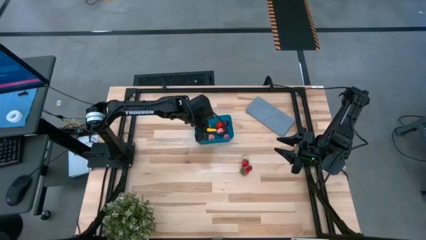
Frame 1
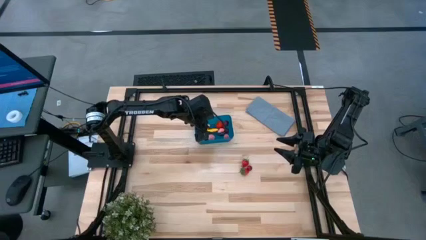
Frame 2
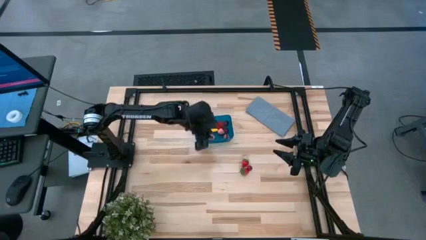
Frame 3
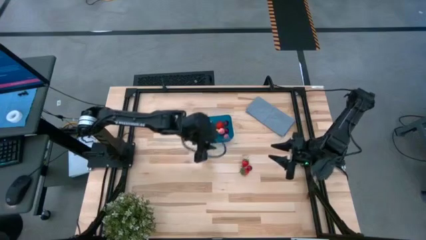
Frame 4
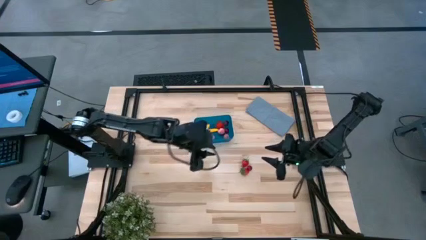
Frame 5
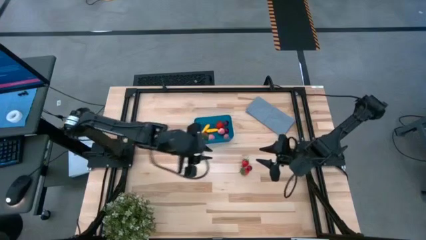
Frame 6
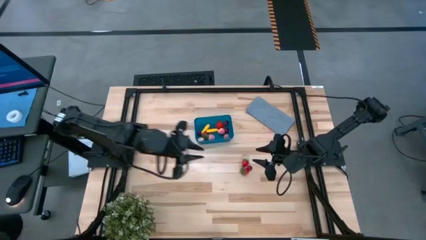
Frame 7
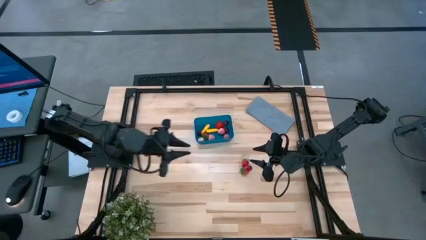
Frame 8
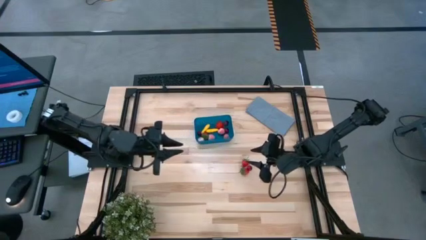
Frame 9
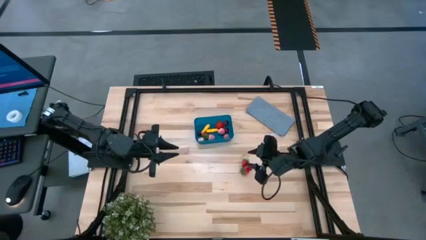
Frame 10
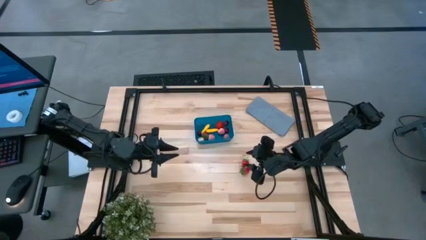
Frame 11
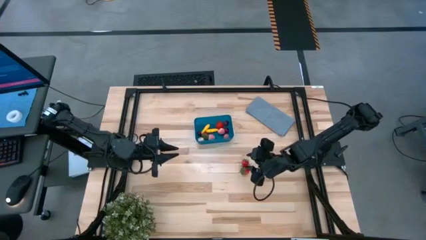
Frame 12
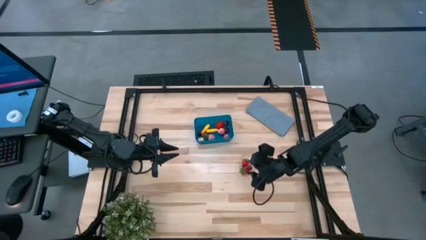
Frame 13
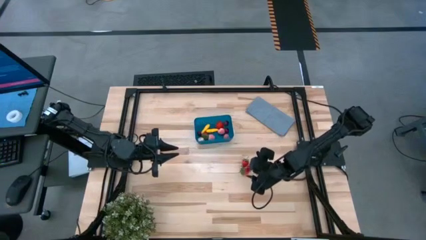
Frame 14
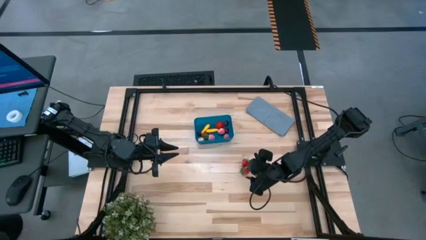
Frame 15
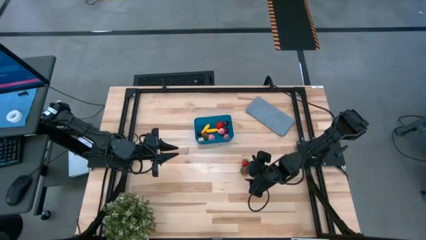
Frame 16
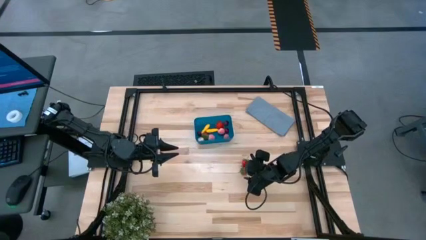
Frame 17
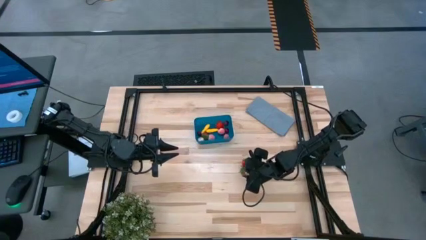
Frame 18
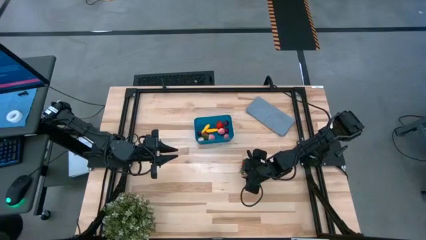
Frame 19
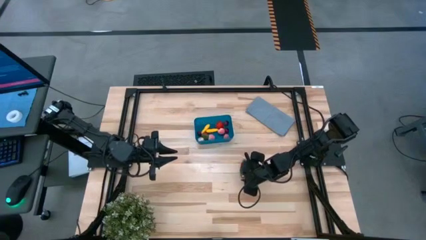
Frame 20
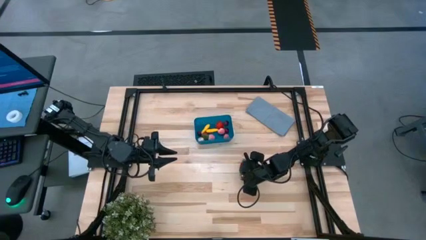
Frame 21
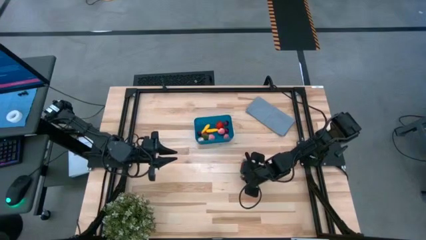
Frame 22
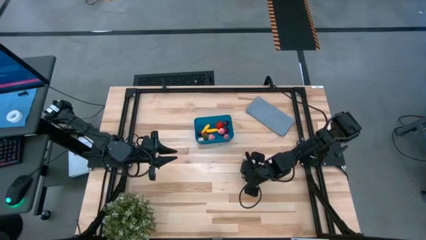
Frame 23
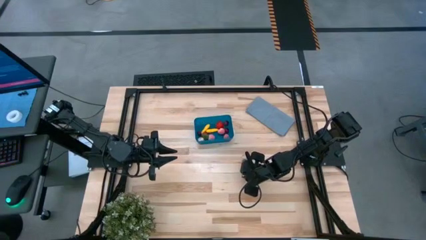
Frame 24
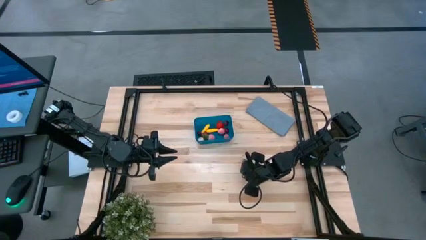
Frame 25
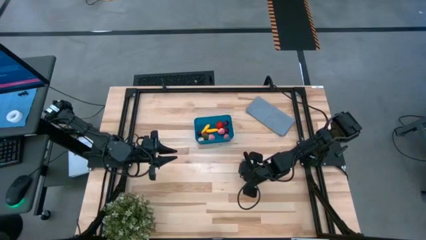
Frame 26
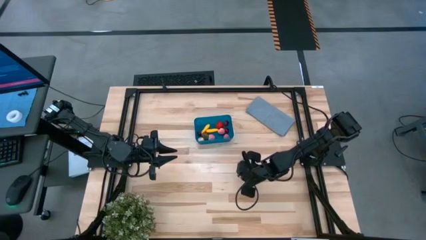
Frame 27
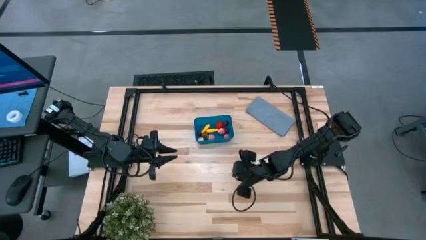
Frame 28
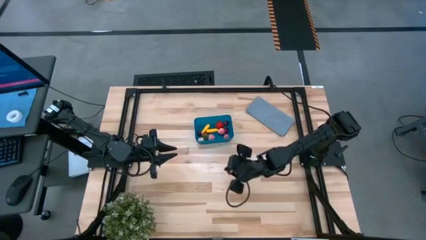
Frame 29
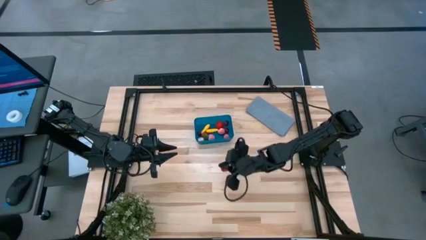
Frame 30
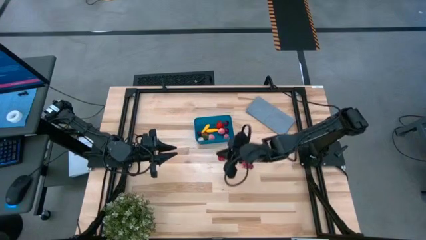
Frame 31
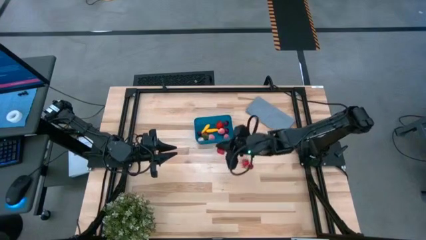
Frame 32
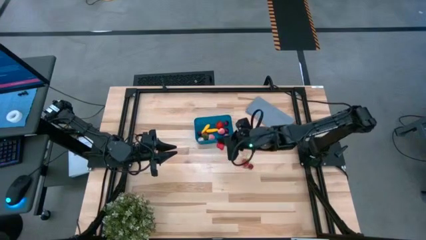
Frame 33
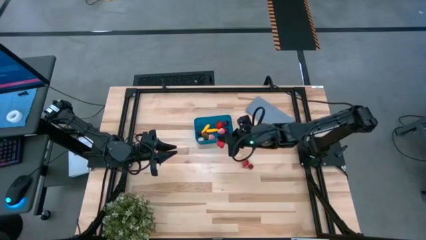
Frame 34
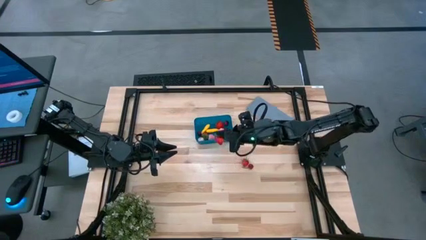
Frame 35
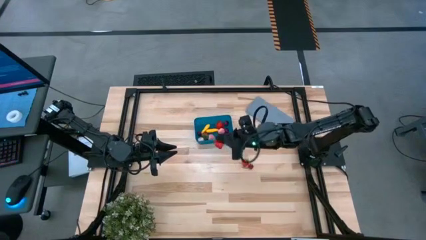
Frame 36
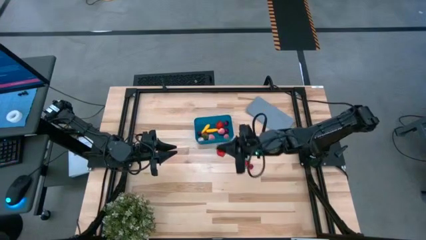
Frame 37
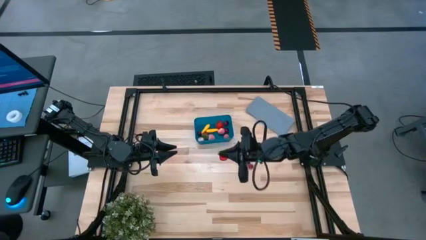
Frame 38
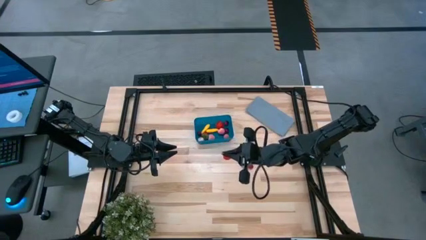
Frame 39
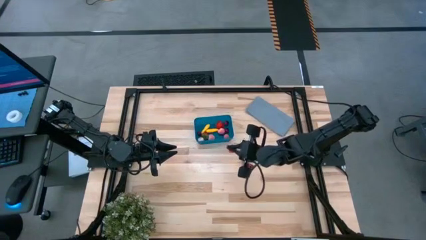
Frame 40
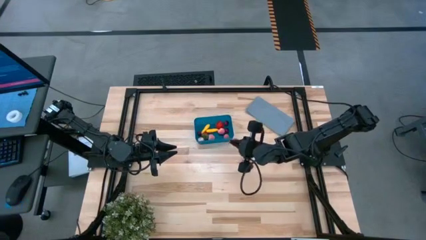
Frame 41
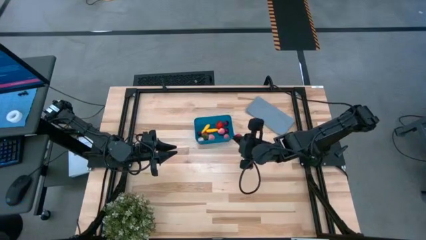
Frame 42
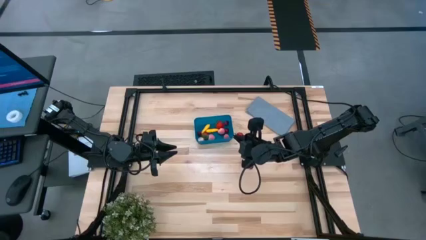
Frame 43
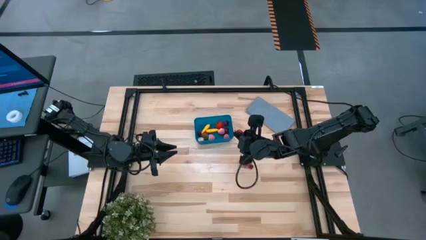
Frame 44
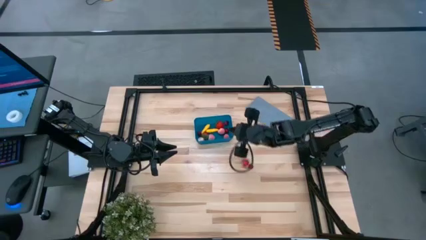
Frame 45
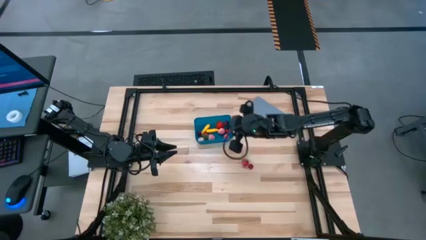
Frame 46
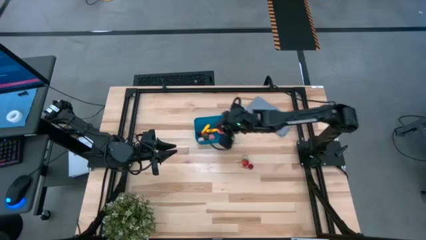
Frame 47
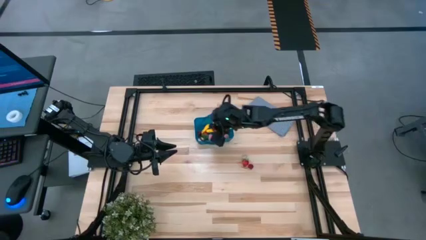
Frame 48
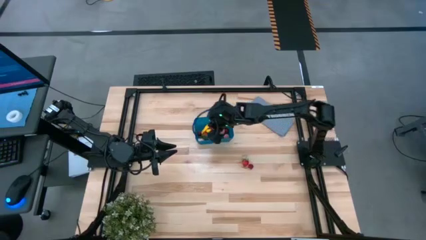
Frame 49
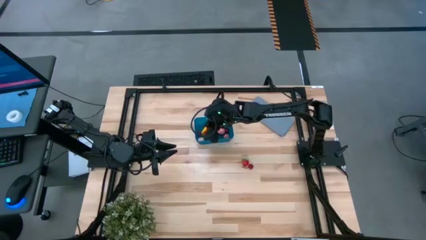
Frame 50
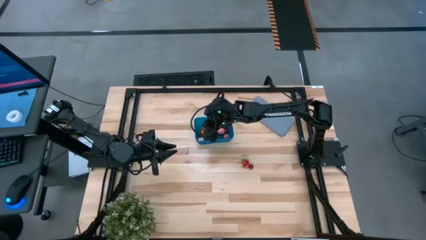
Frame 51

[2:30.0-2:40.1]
Task: Pick and placing Produce into tupperware
Put the red strawberry into the blue bin

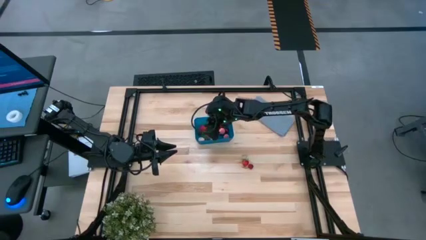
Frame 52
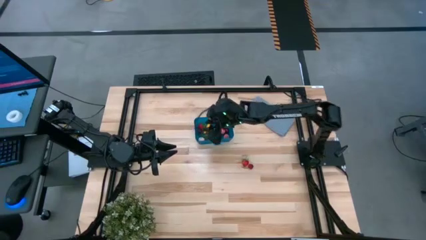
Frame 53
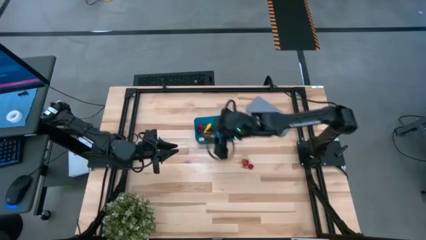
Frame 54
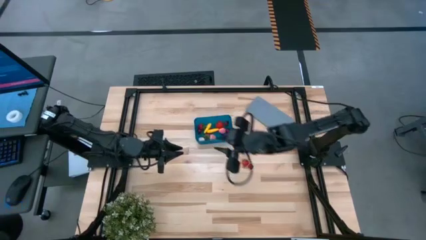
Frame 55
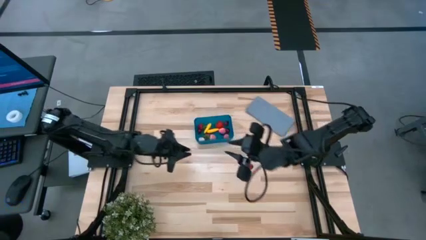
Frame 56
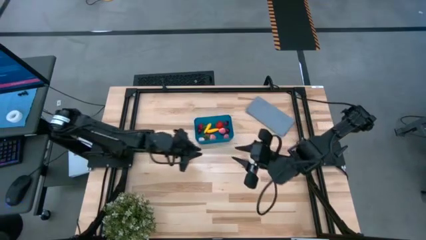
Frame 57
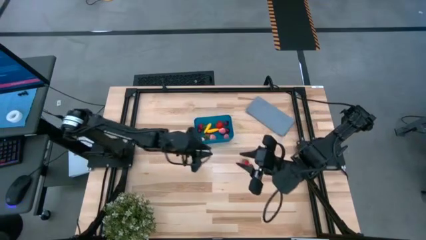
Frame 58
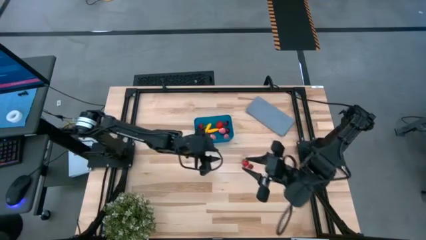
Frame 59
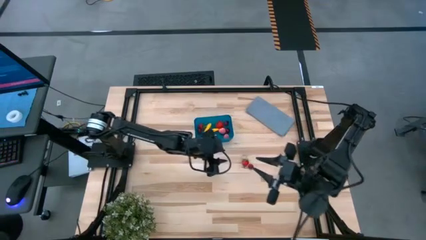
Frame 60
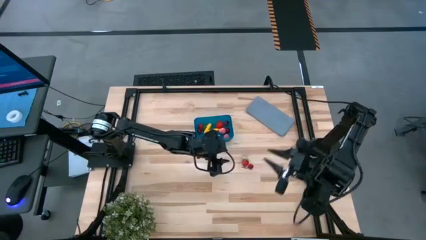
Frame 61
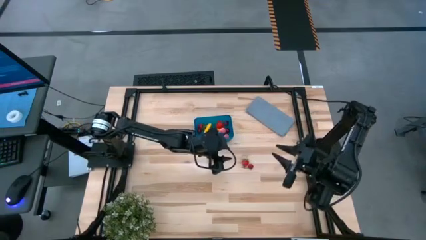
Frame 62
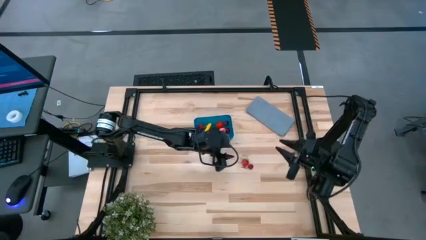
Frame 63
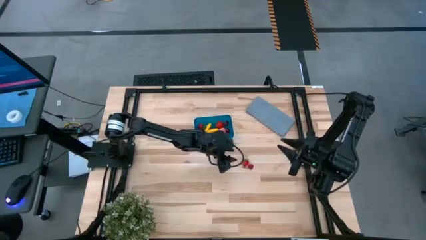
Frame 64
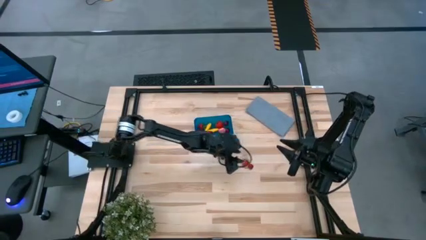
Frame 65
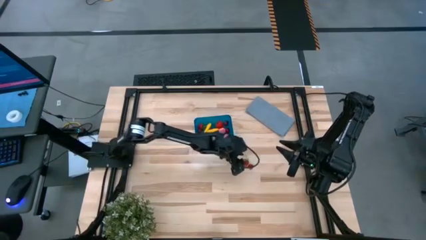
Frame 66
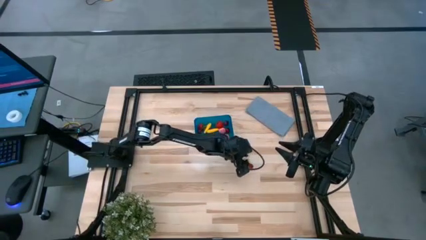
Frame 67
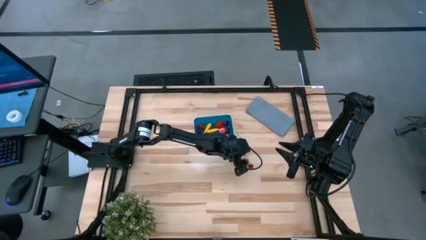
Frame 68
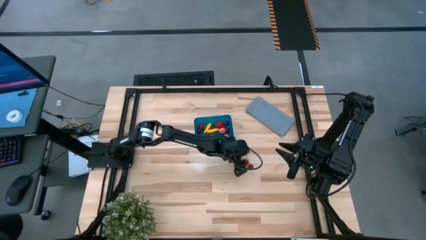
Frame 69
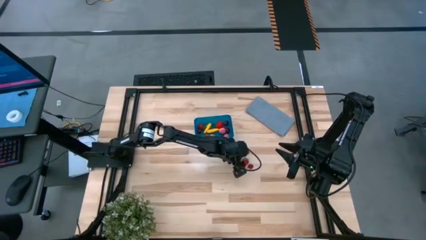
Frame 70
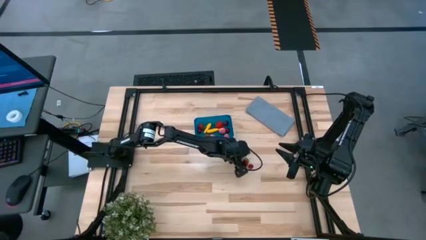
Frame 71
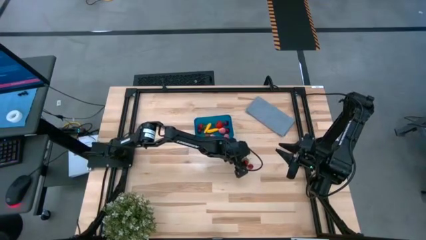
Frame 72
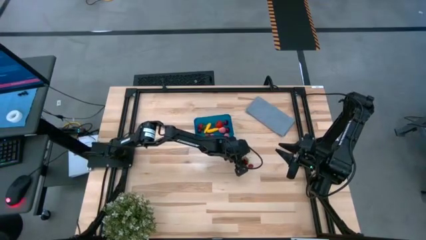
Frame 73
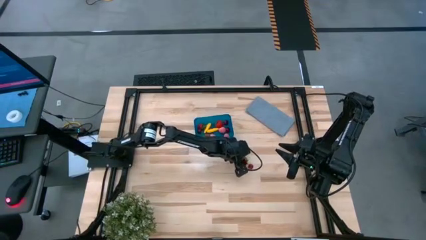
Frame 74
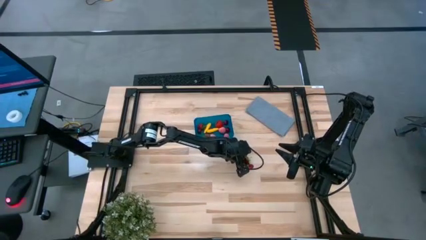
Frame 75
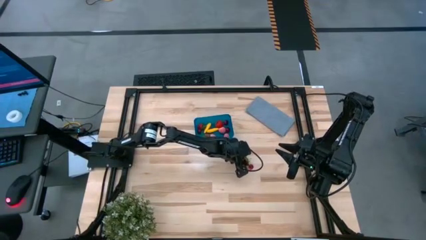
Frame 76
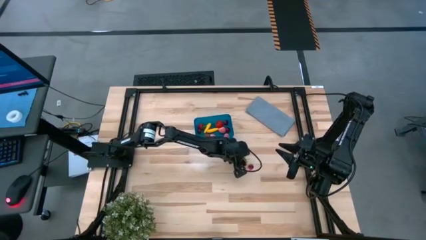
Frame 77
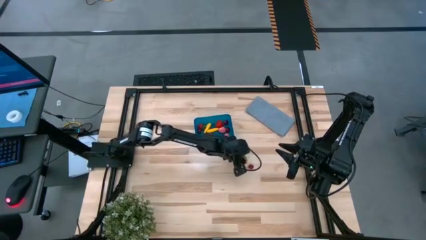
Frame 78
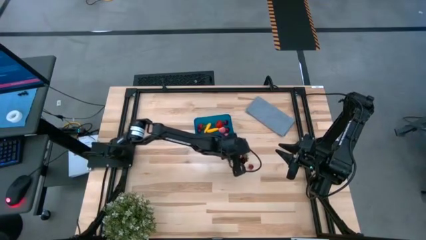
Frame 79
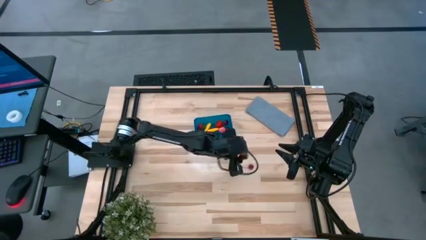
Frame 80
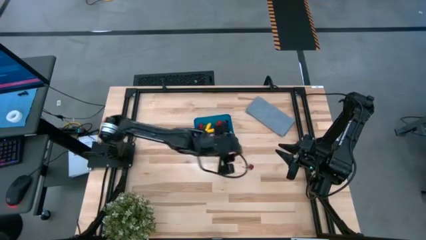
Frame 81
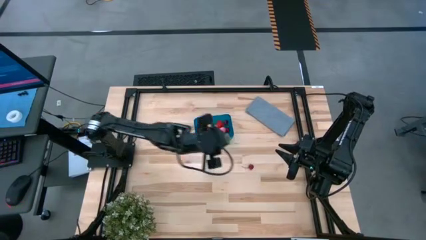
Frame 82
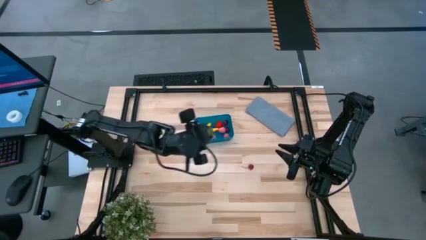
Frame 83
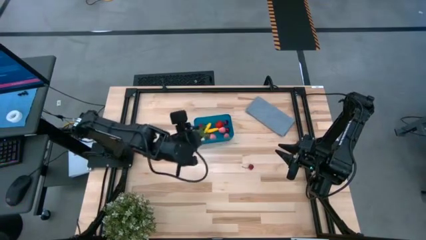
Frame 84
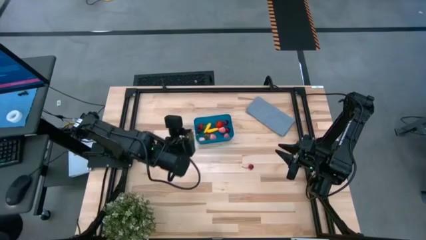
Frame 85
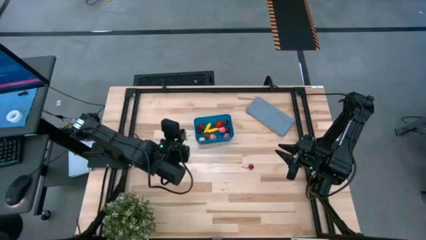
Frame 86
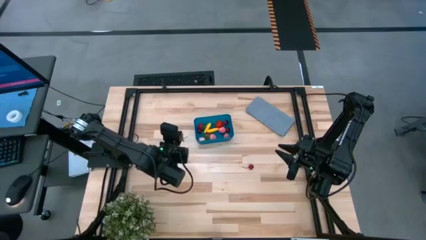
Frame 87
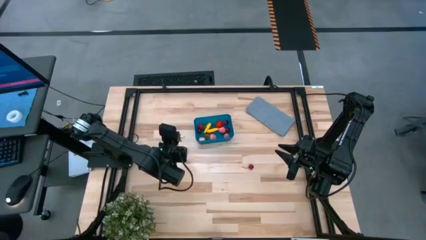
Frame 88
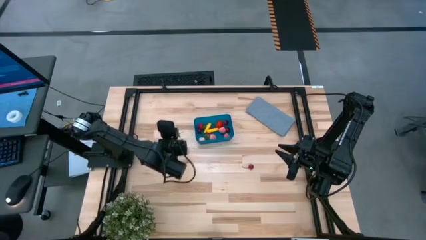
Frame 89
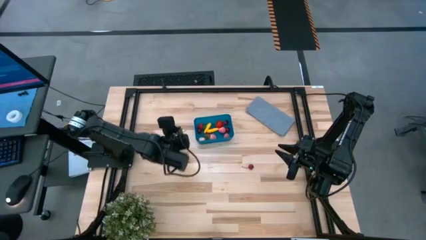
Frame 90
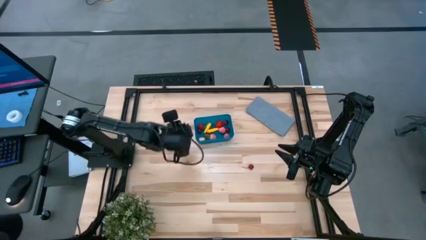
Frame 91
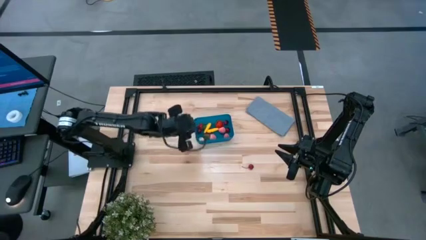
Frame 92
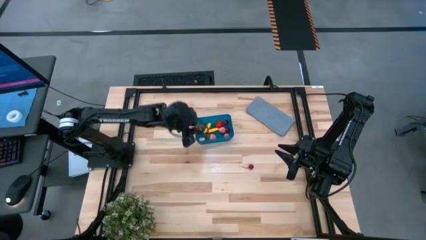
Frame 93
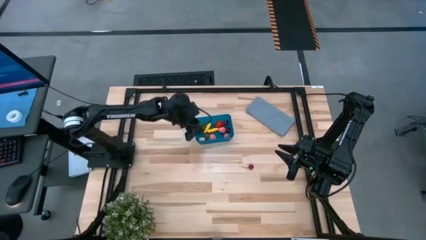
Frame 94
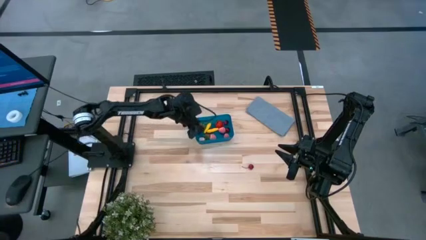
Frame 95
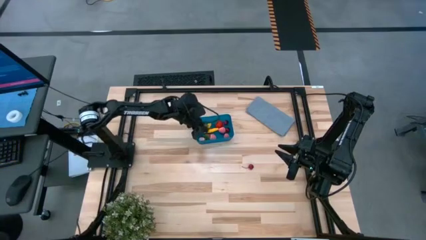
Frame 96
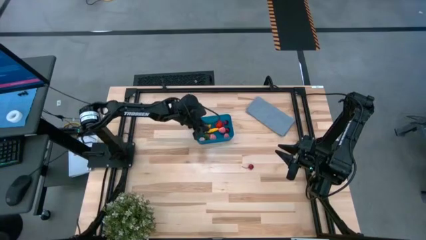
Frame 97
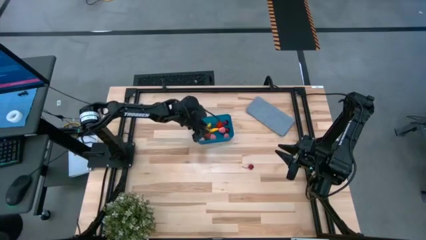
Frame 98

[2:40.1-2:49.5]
Put the red strawberry into the blue bin
